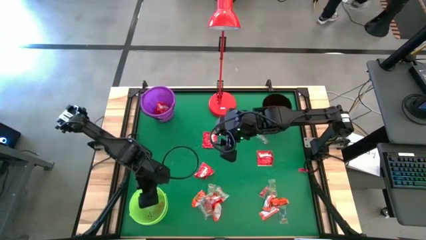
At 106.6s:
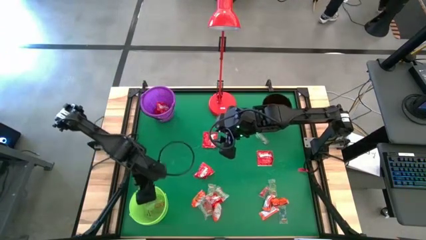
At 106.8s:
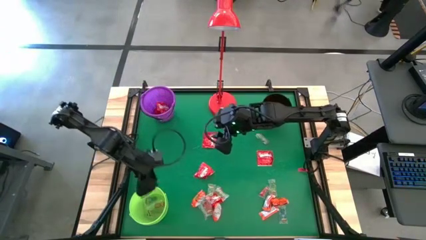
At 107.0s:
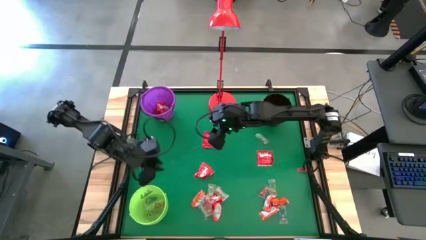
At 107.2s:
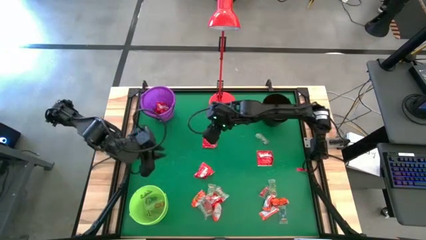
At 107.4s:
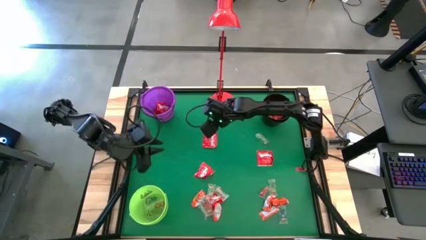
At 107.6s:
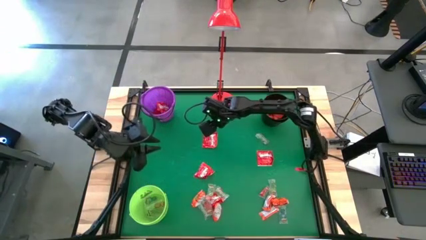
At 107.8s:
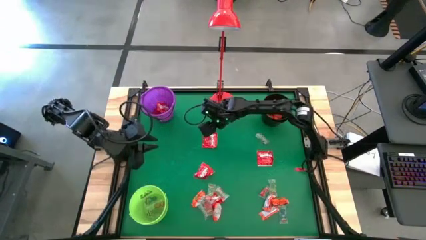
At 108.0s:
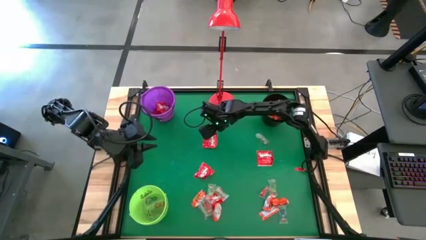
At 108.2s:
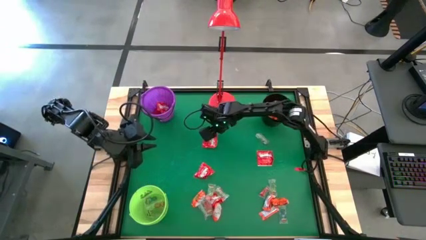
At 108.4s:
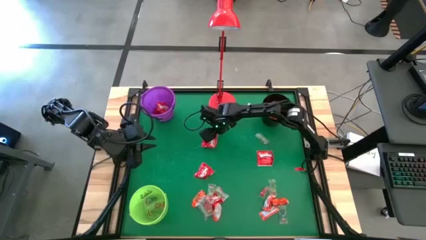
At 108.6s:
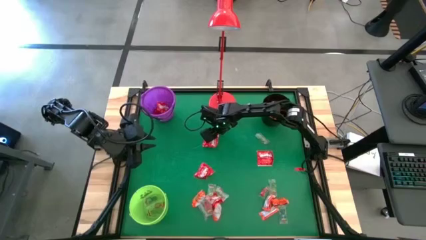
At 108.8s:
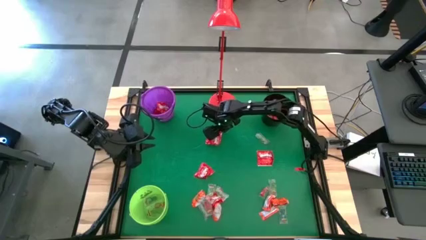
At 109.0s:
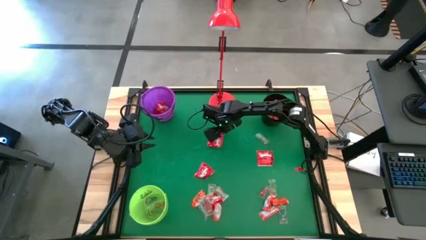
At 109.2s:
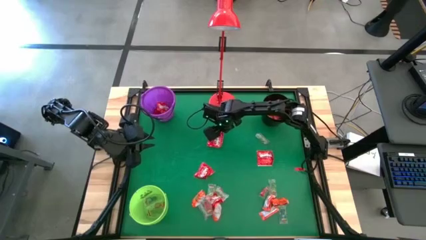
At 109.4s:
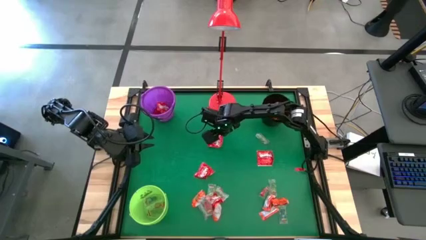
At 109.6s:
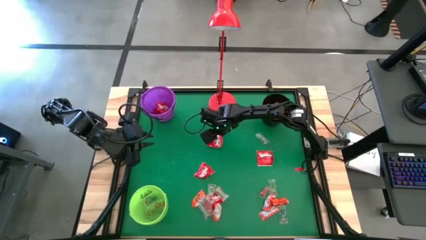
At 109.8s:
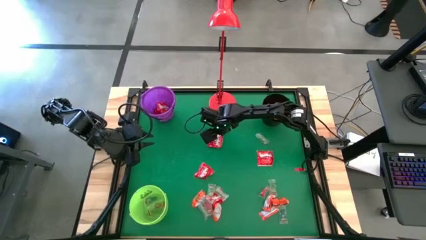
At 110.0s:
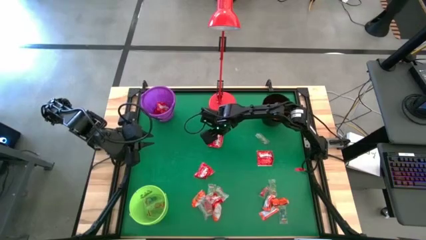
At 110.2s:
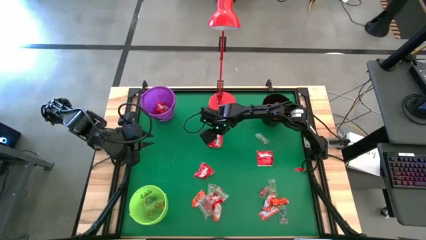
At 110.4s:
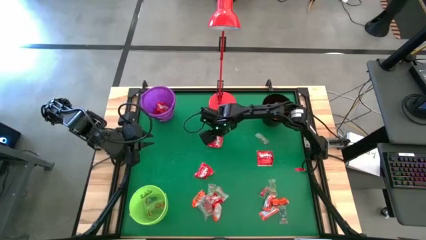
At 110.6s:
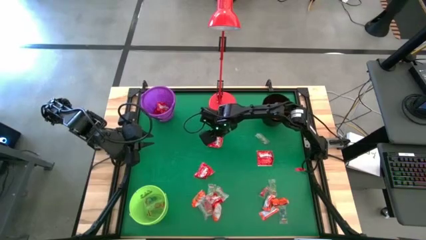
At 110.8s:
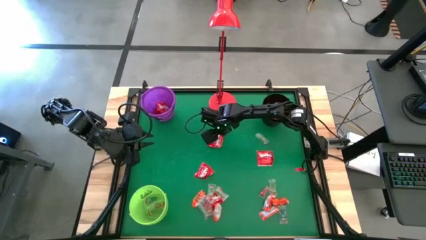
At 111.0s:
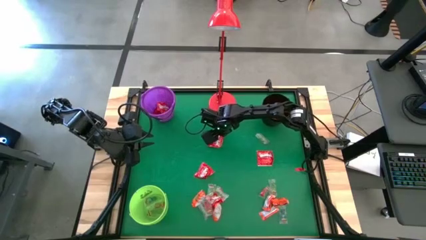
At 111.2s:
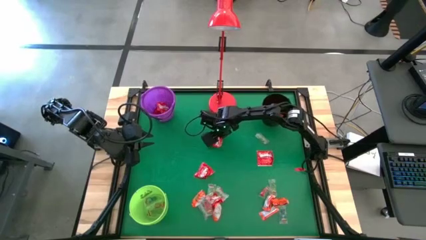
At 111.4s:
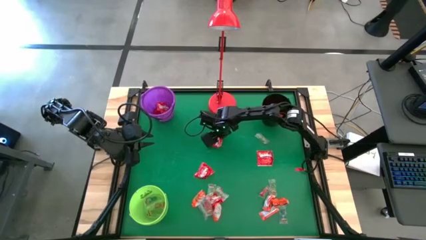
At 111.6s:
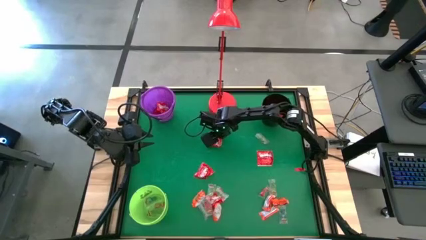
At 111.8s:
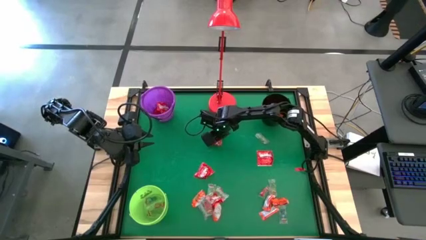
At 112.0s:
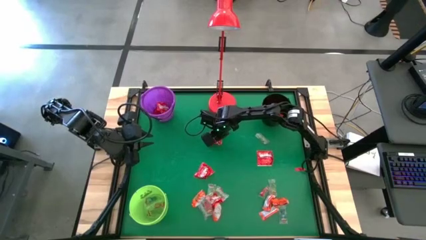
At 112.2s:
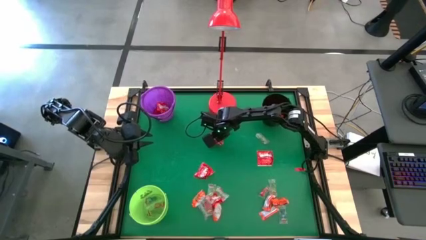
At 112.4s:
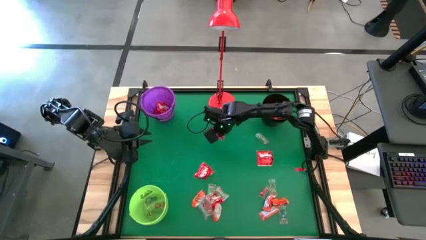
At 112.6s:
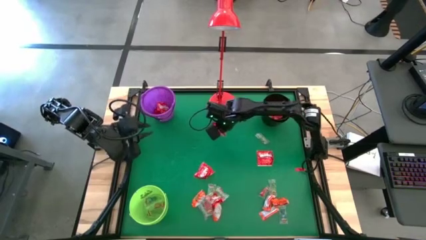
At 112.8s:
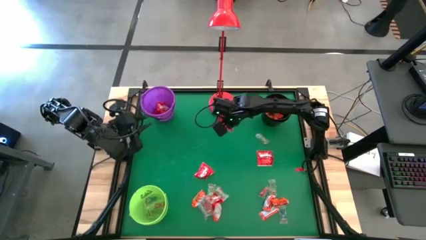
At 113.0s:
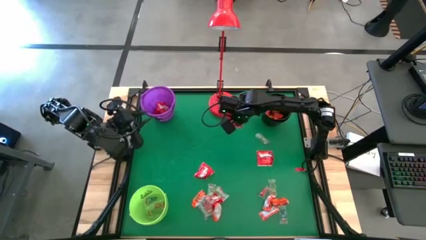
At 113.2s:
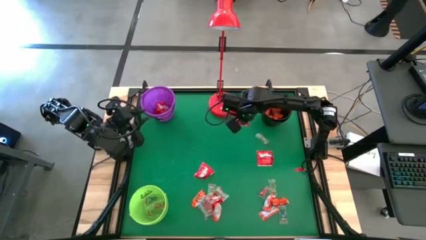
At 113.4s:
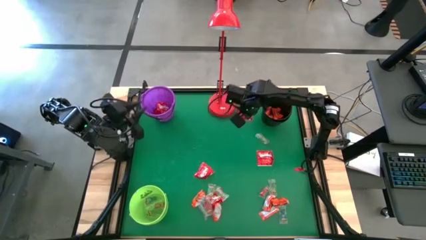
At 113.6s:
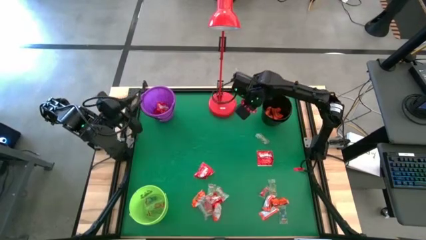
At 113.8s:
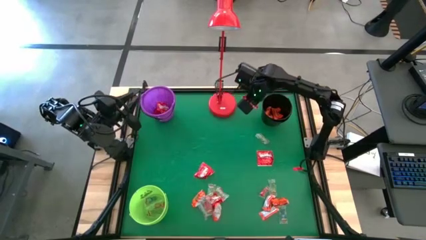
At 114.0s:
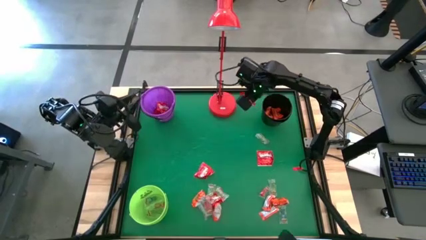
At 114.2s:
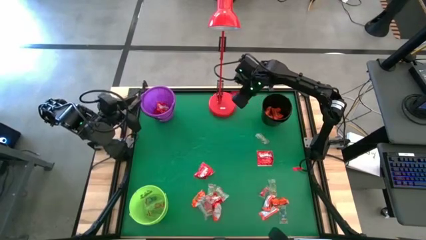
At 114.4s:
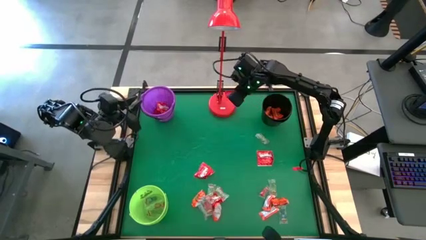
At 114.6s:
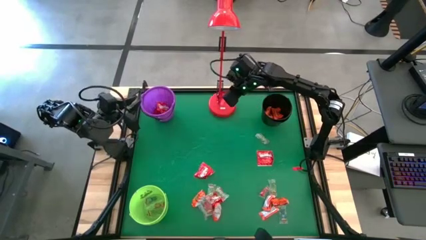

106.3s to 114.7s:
Task: Sort candy
Put the red candy into the violet bucket

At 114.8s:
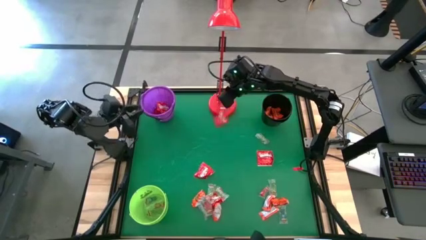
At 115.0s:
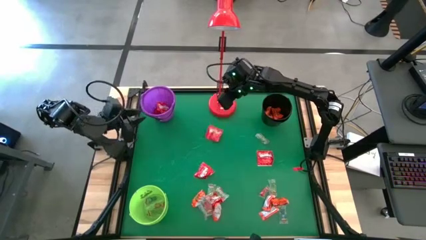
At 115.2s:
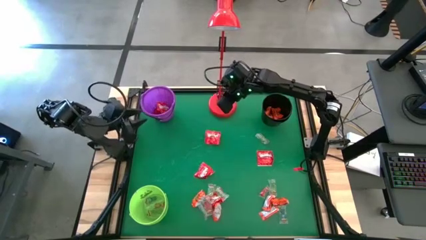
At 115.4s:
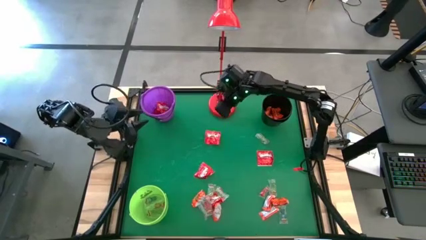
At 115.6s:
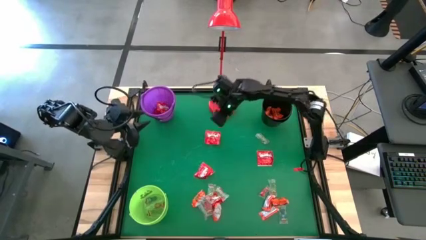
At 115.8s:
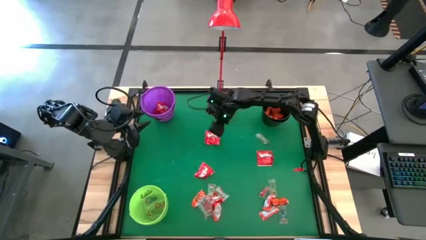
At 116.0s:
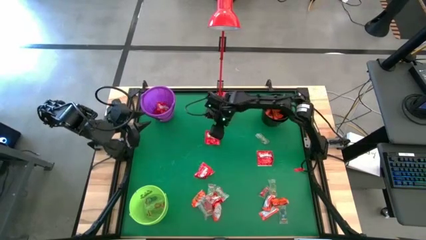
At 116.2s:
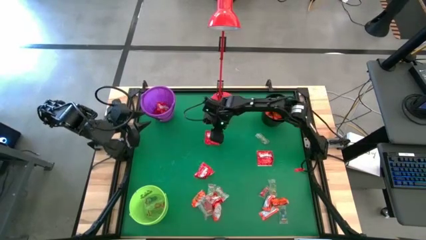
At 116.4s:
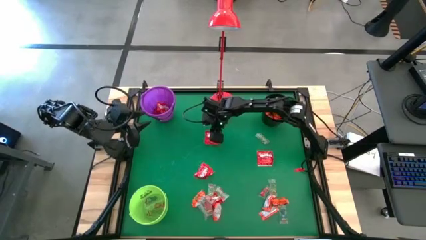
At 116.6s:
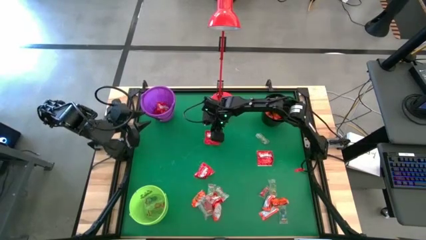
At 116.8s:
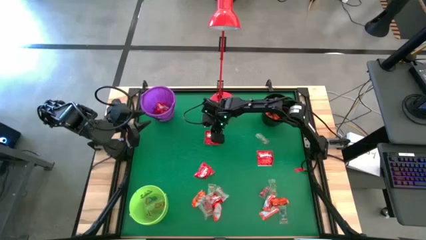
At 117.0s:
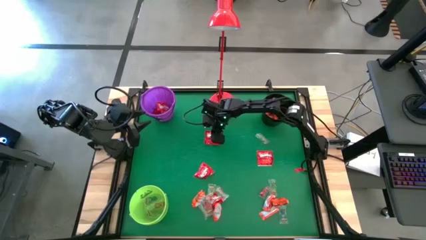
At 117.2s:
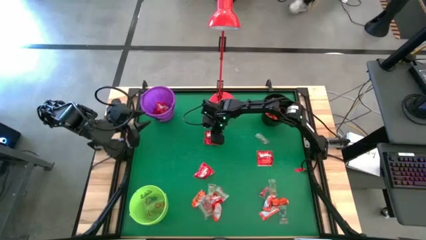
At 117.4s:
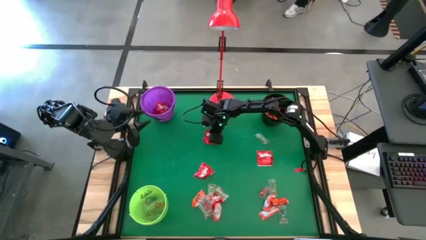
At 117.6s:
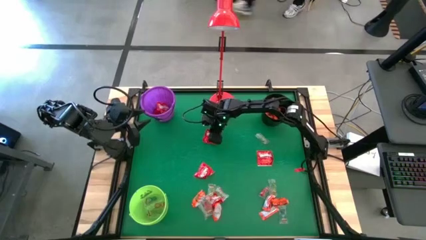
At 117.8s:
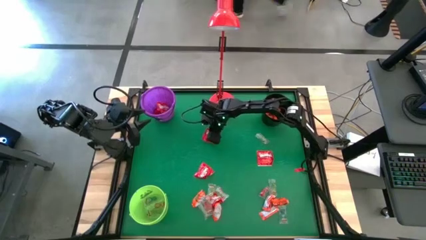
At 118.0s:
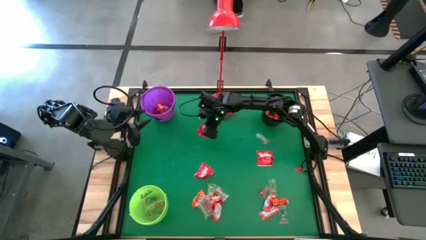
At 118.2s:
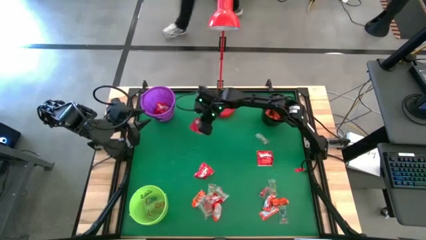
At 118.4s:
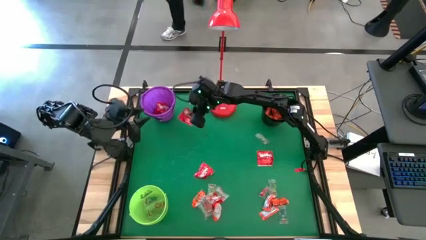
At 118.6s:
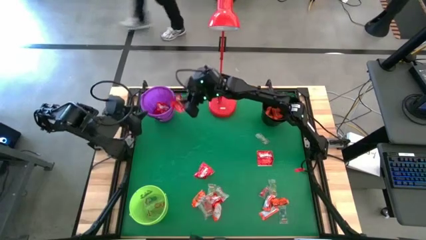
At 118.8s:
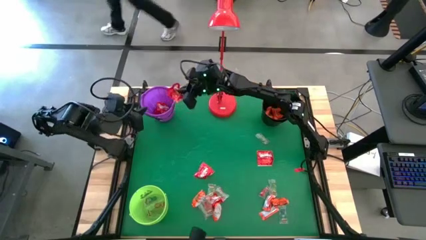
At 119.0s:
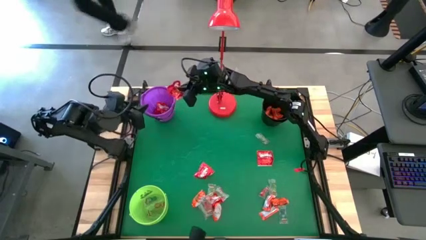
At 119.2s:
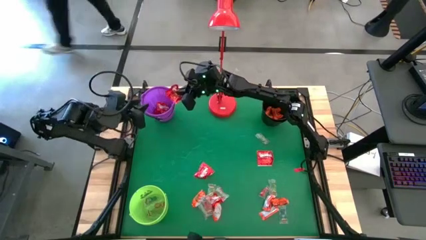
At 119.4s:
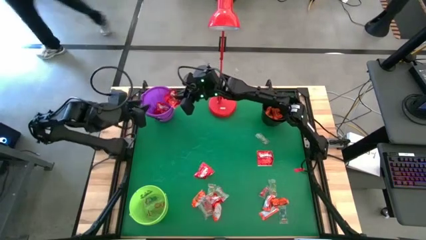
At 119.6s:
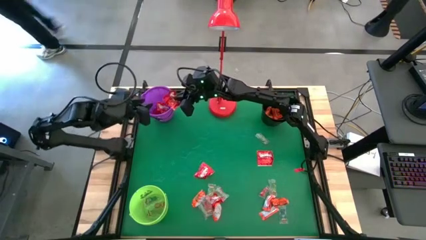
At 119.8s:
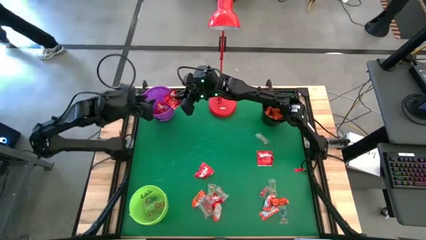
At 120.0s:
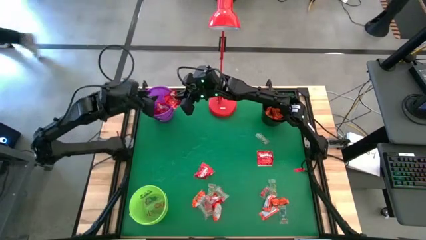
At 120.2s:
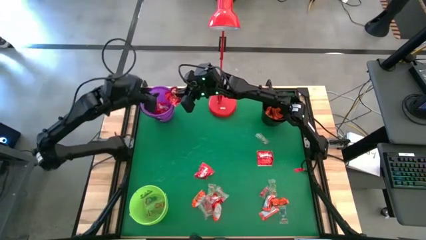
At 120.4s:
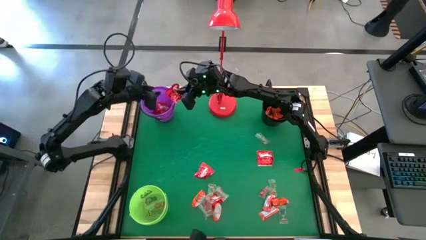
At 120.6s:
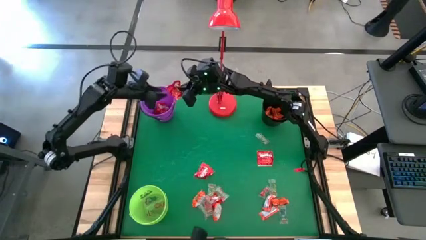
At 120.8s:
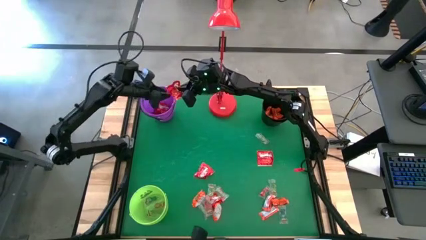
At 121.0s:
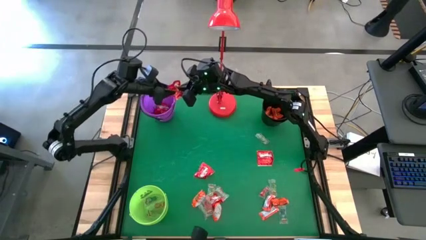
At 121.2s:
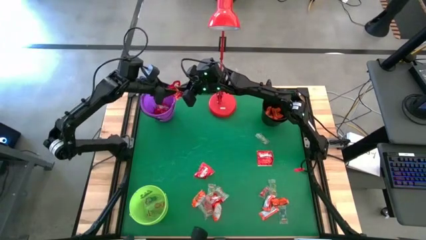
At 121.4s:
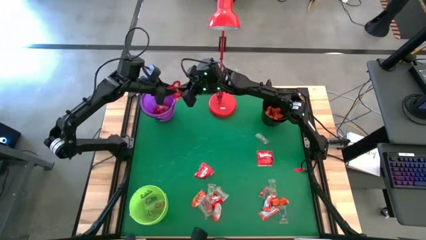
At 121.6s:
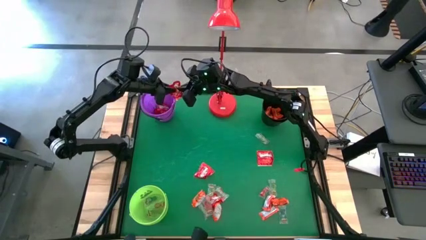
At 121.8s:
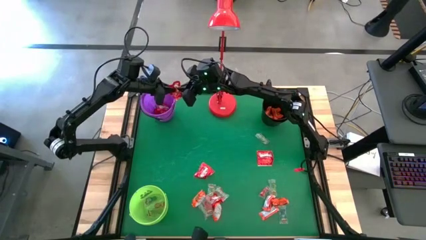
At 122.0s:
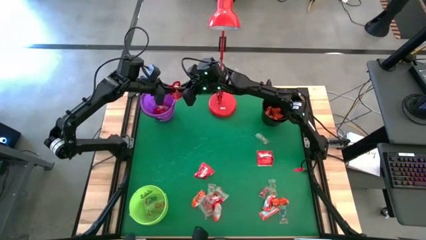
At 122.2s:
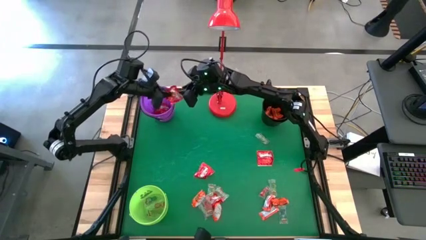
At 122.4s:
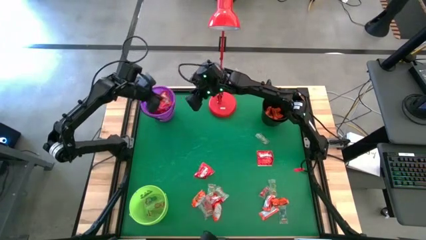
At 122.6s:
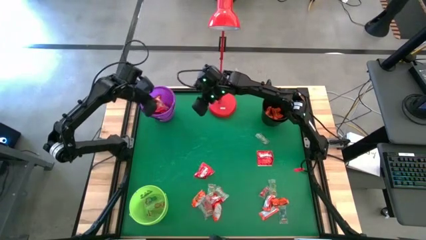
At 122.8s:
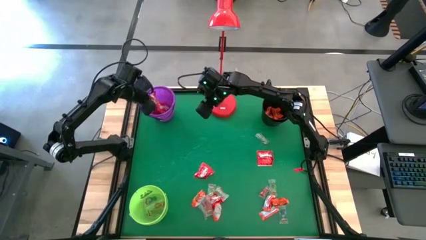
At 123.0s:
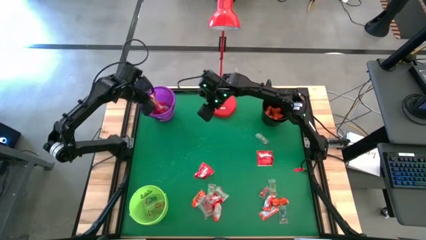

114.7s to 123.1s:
Put the red candy into the violet bucket
